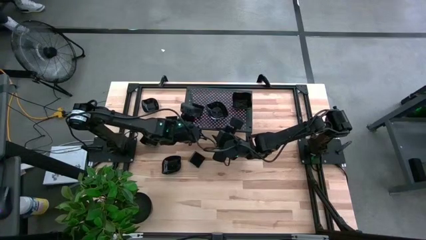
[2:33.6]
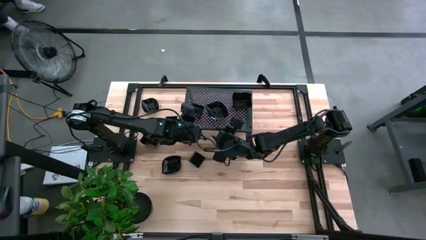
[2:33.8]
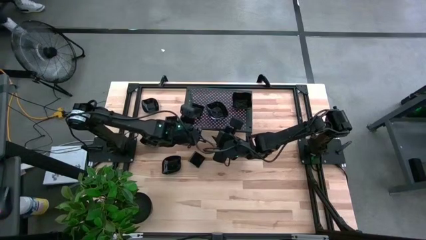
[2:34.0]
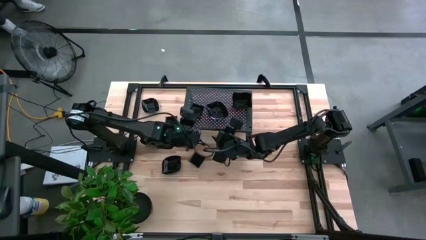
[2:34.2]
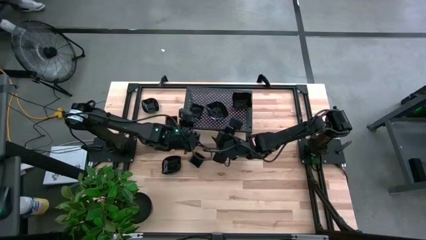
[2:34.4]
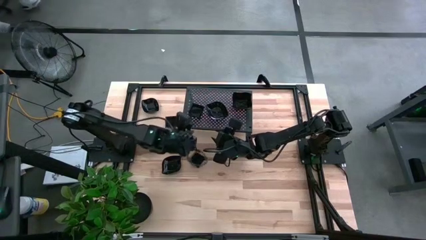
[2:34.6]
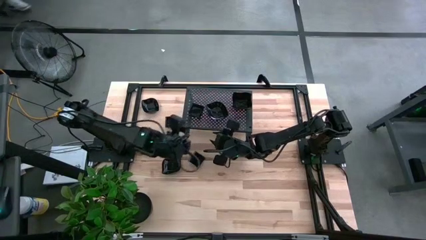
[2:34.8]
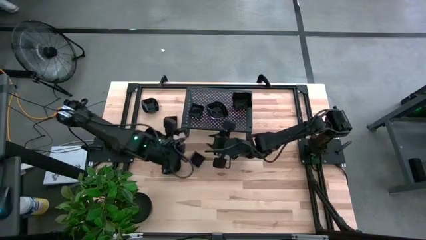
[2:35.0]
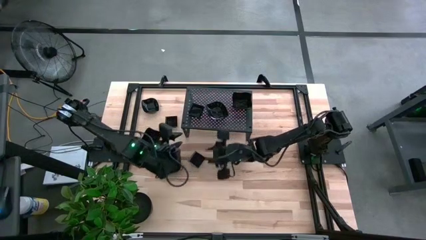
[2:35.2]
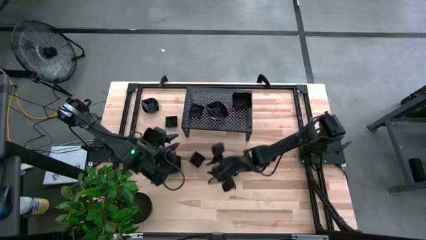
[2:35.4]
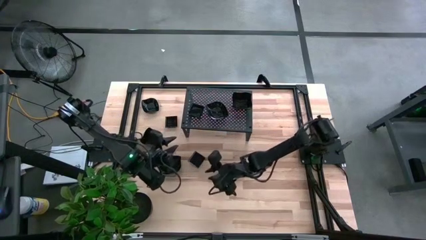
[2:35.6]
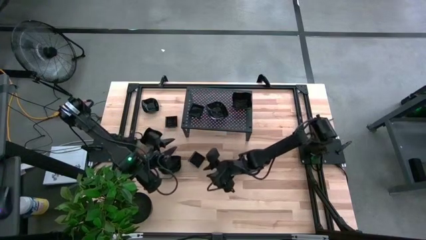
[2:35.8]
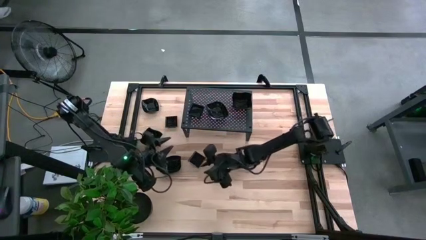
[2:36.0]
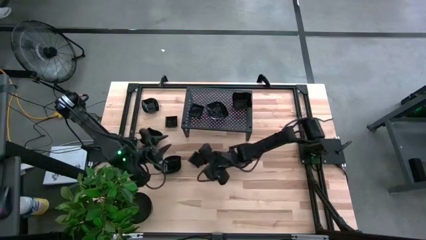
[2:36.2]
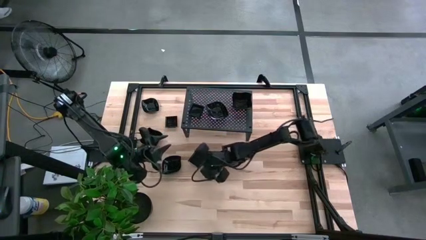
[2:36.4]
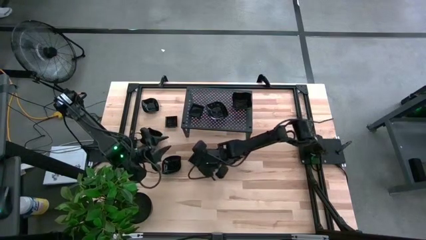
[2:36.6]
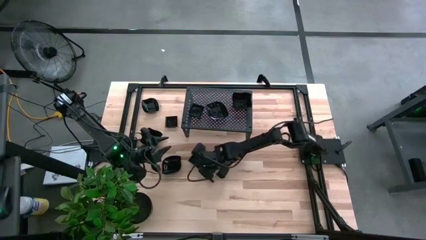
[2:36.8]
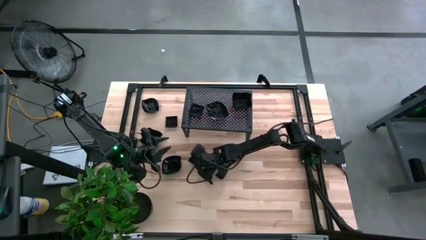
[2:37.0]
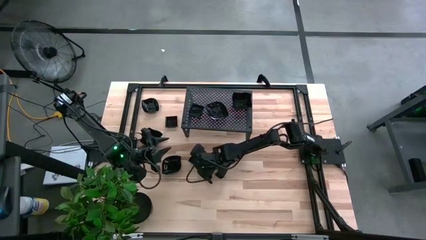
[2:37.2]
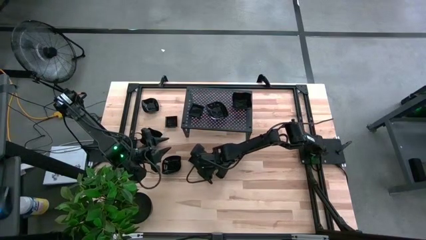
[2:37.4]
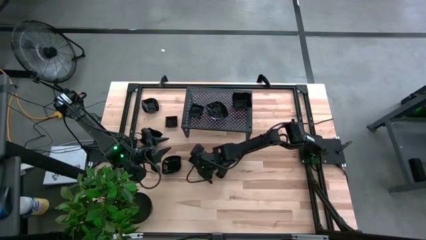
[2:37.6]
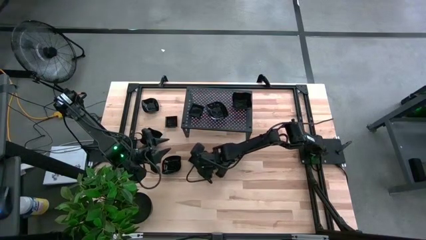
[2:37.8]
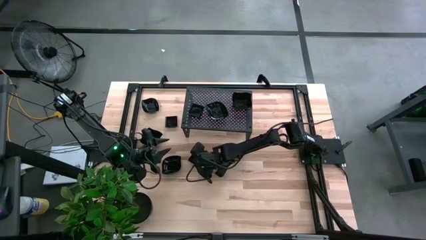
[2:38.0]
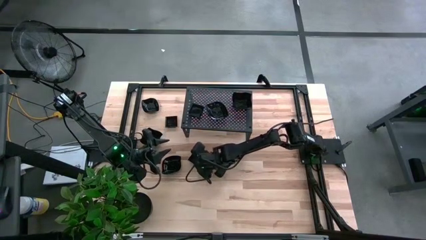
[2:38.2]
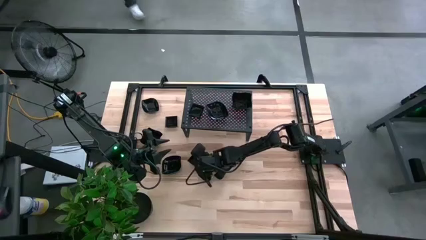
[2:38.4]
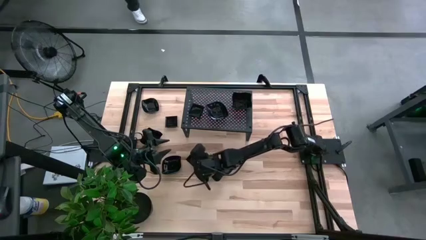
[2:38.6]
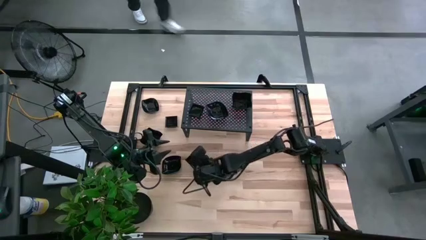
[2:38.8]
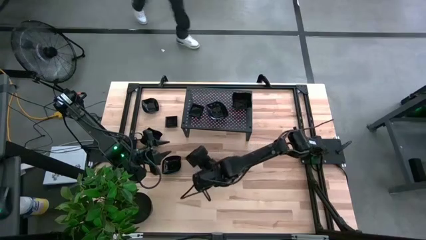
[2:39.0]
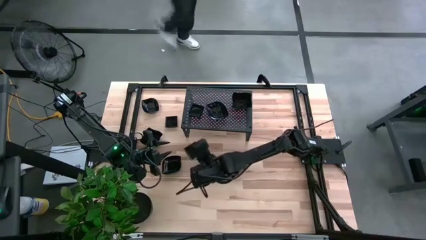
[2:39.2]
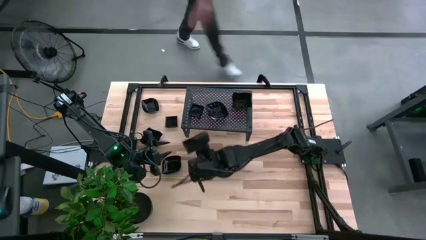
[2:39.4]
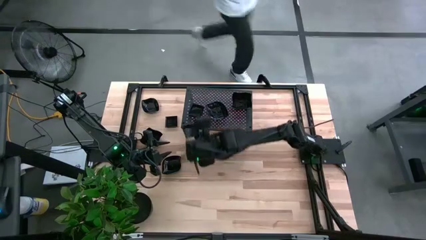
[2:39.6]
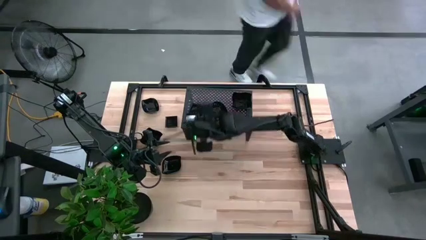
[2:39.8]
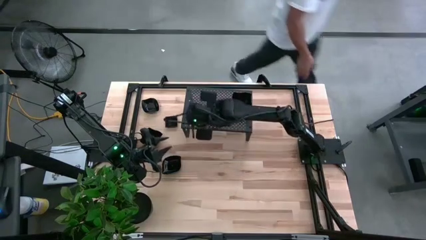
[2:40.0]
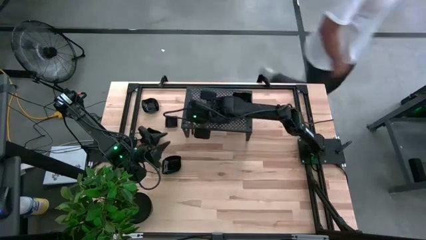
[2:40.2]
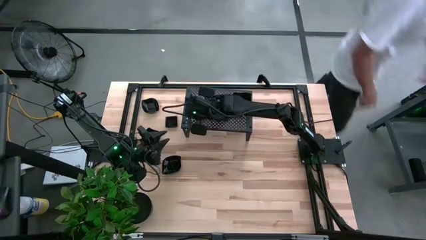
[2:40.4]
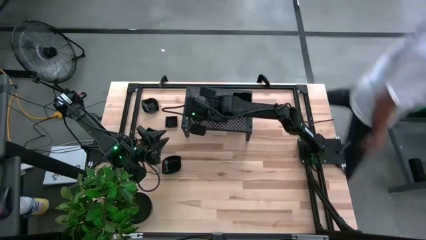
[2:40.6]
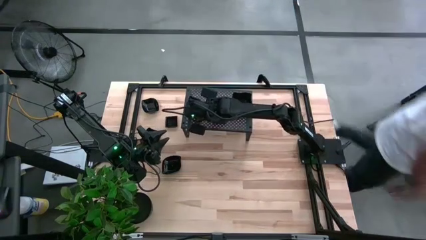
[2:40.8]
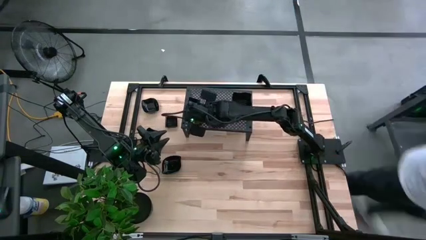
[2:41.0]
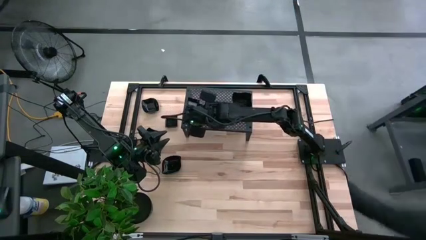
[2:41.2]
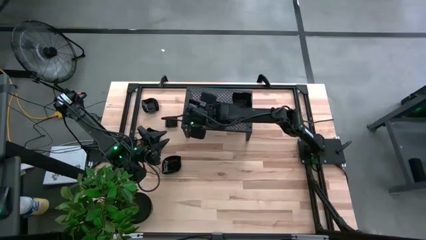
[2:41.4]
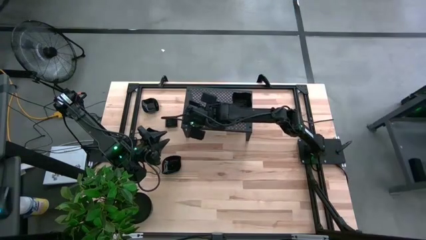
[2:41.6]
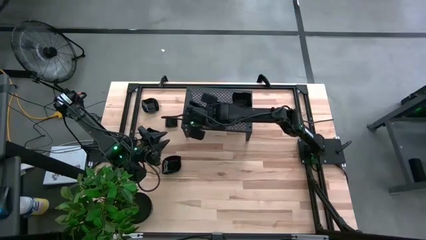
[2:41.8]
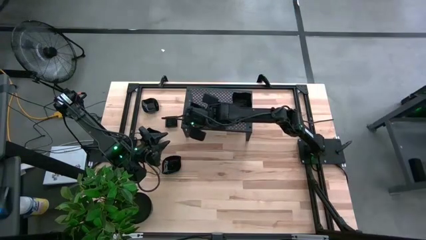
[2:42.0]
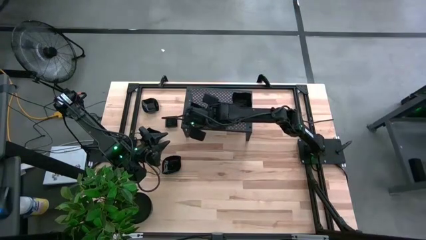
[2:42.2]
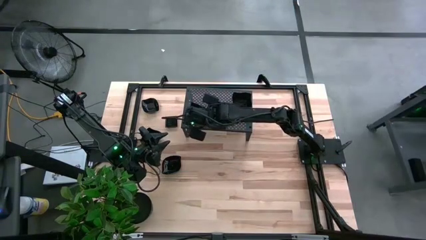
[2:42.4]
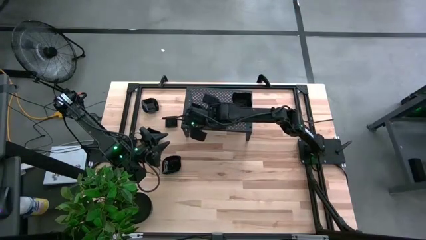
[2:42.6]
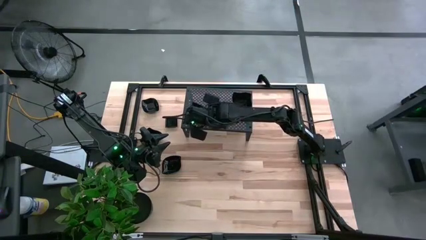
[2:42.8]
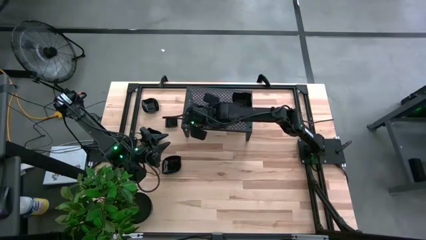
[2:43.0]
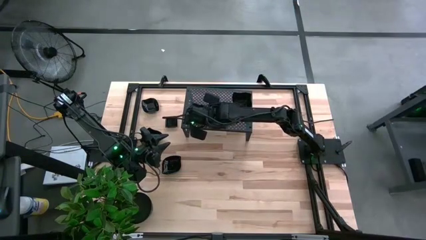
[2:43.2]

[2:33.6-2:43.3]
Task: Pick & Place Mini shaped plates
Stack the square plate on the square plates on the shelf

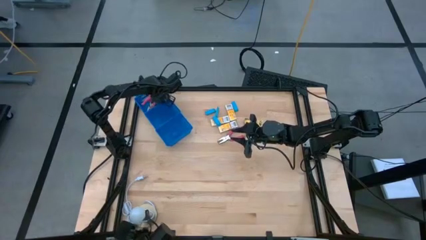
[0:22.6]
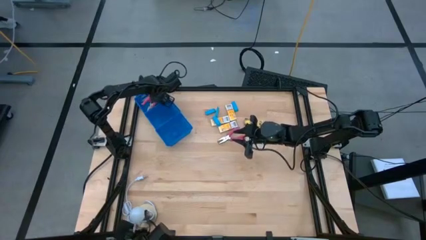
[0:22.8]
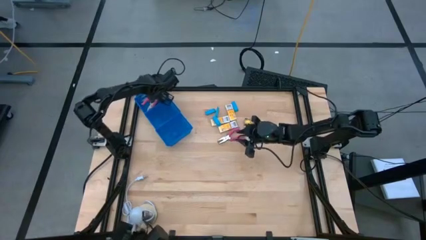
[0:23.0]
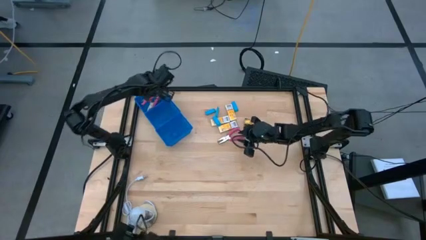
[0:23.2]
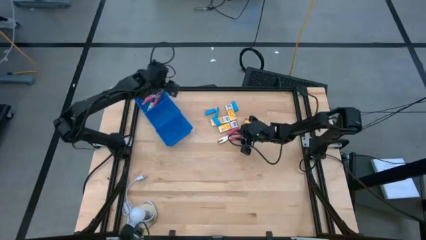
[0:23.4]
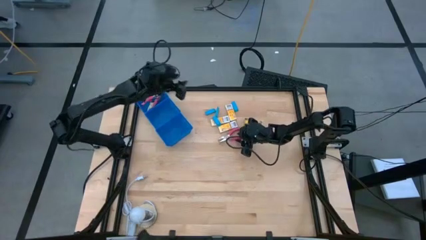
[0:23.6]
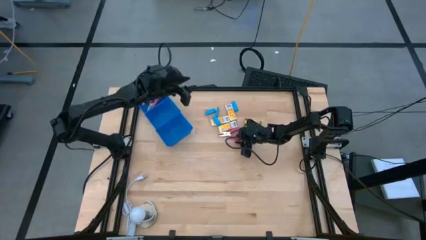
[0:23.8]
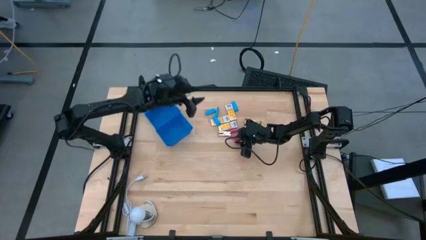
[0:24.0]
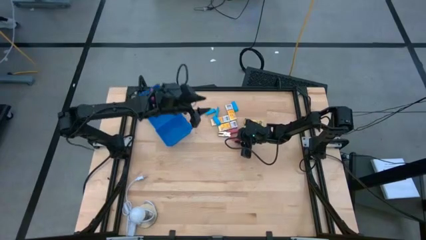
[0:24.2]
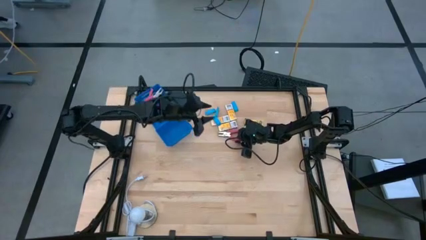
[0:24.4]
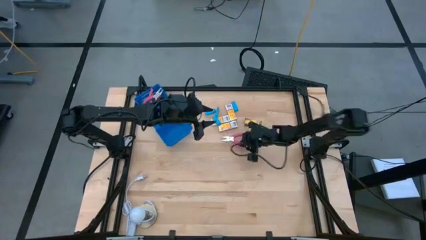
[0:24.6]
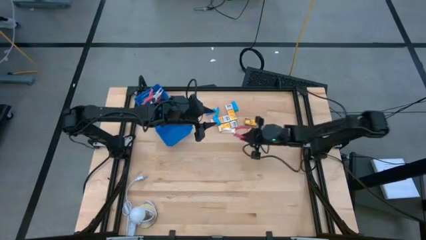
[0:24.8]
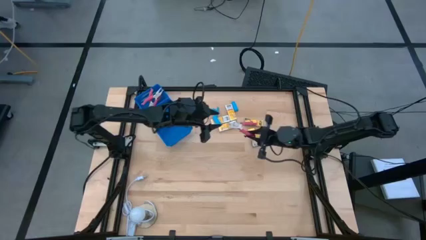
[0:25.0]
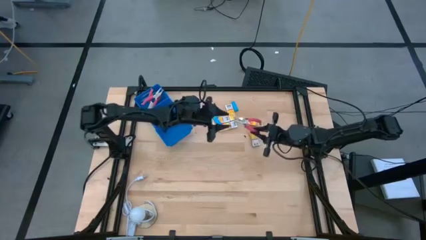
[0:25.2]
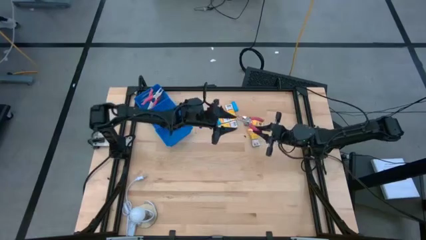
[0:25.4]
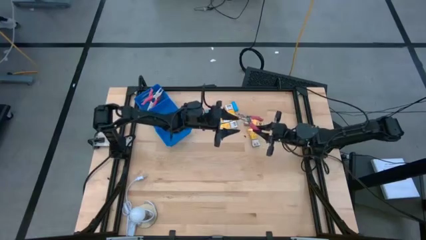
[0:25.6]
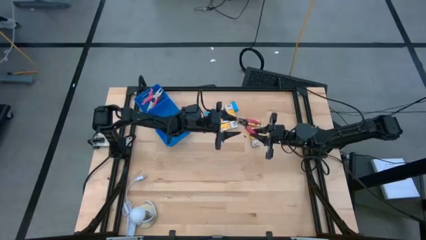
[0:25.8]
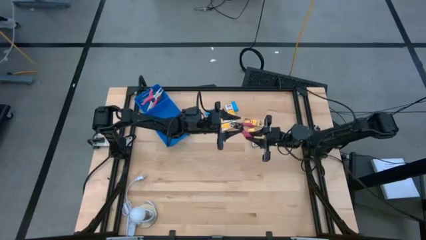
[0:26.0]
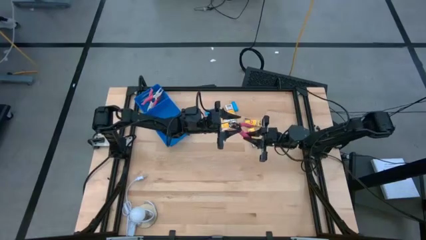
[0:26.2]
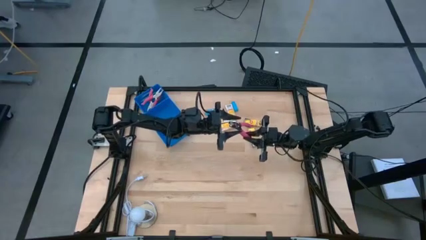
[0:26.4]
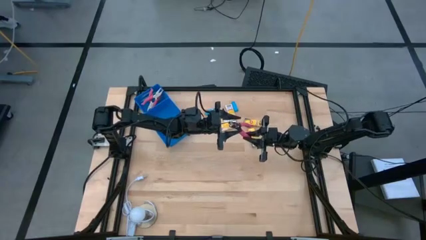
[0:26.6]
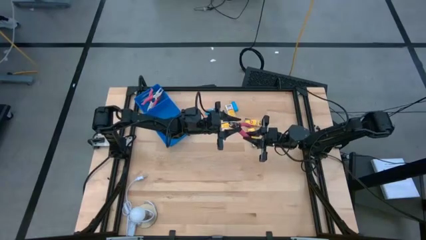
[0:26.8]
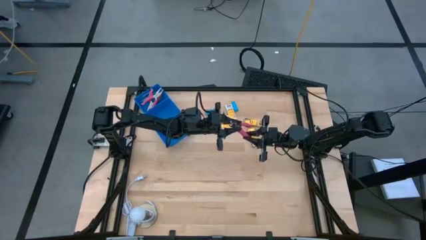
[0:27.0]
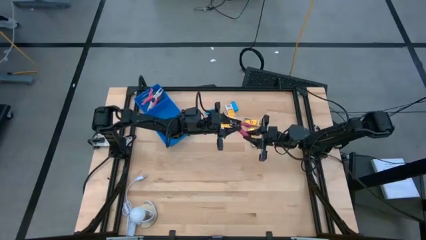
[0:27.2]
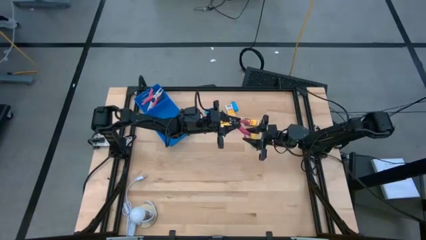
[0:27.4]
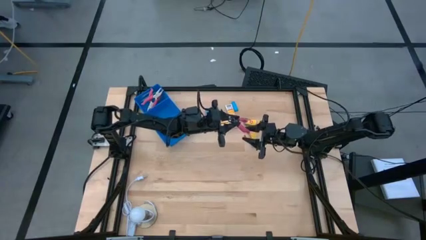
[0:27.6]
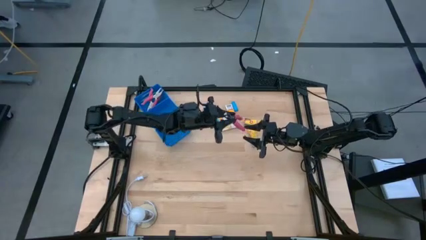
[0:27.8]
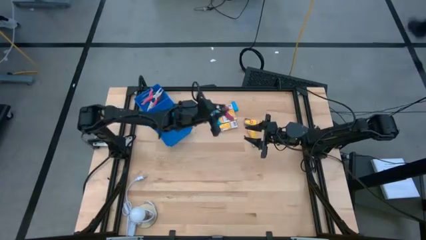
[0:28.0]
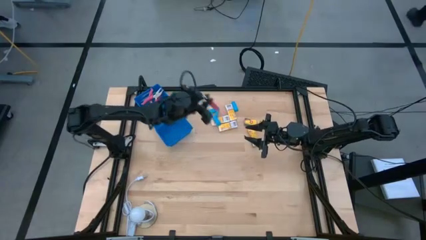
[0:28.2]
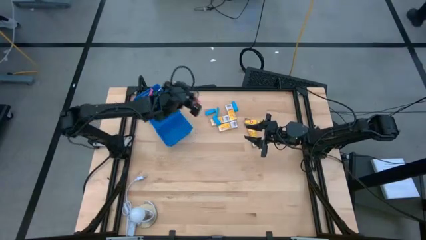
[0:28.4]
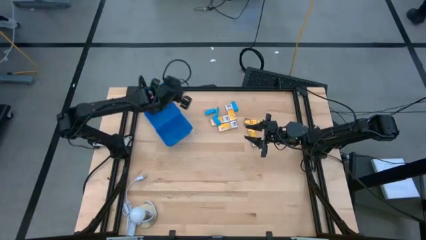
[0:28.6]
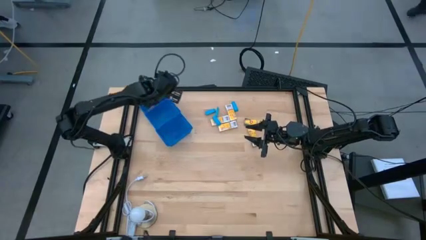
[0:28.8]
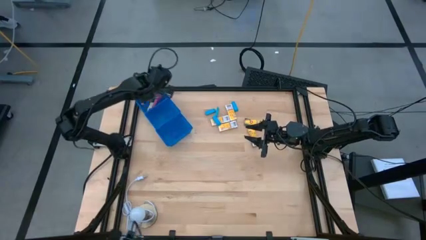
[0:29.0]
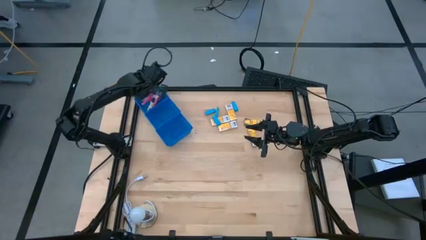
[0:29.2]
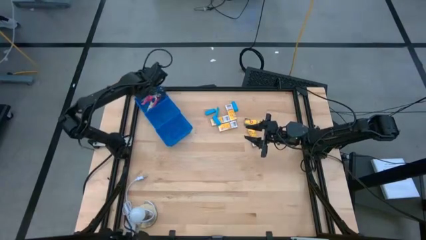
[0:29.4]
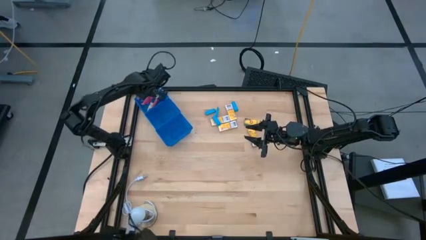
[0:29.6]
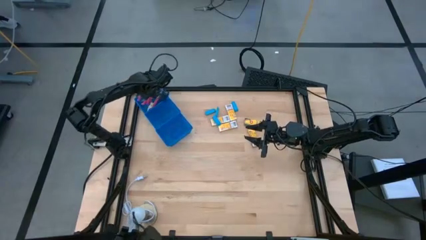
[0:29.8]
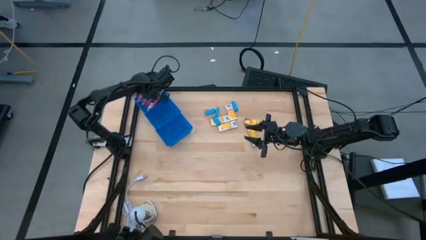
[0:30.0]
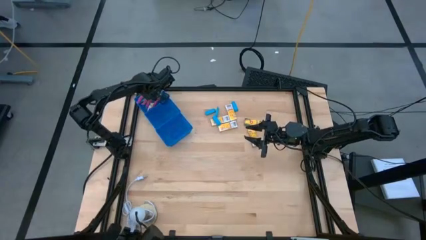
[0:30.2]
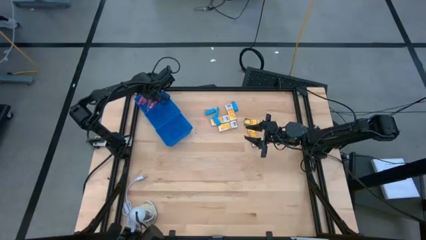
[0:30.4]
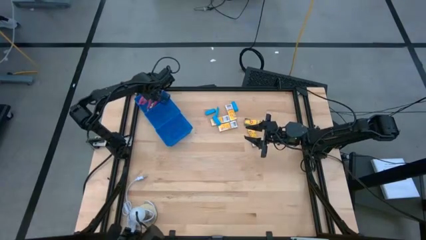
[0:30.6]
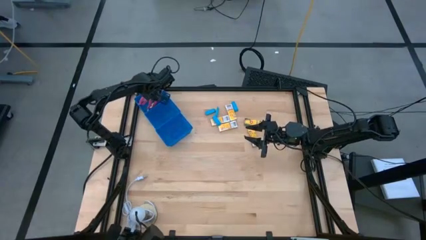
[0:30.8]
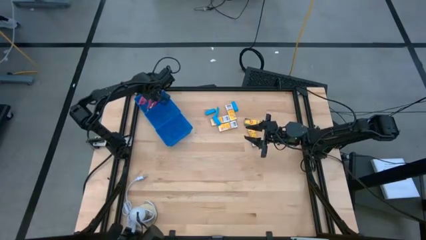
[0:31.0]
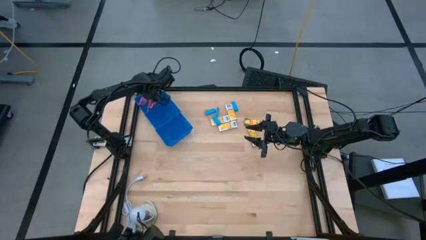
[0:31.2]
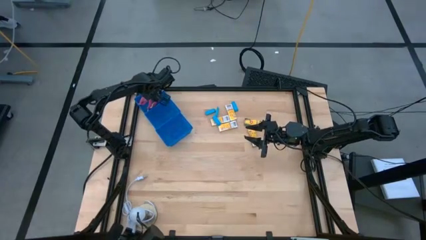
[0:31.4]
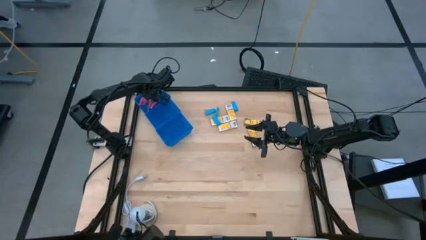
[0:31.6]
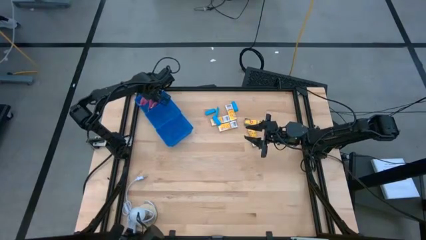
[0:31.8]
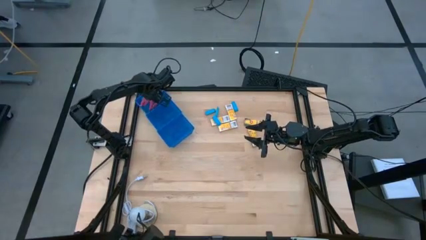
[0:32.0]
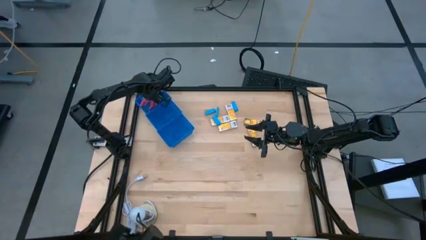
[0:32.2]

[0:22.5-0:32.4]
Task: Pick & Place School Supplies
Put the pink hole puncher into the top blue bin
